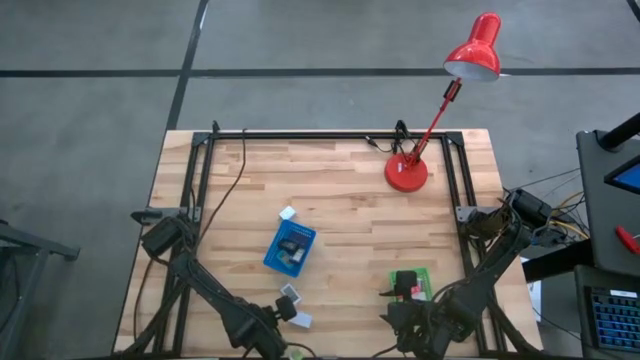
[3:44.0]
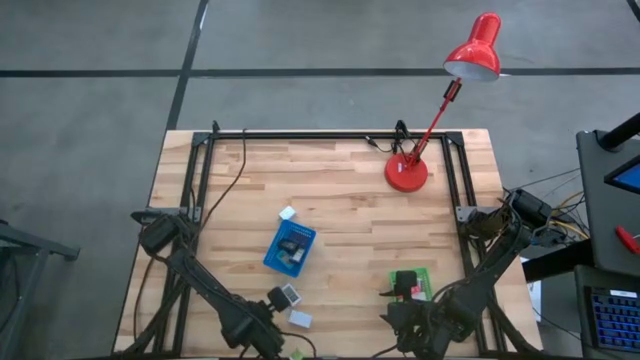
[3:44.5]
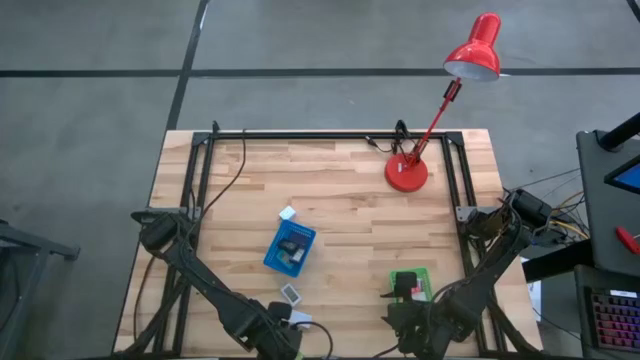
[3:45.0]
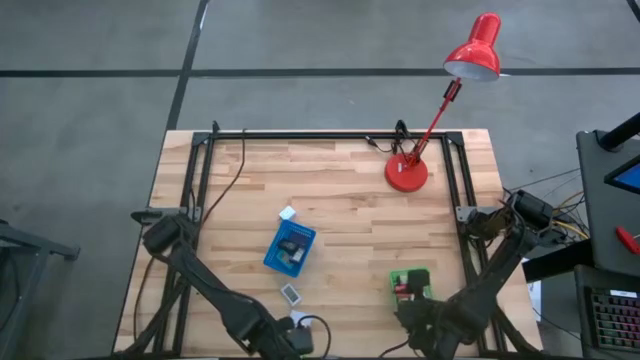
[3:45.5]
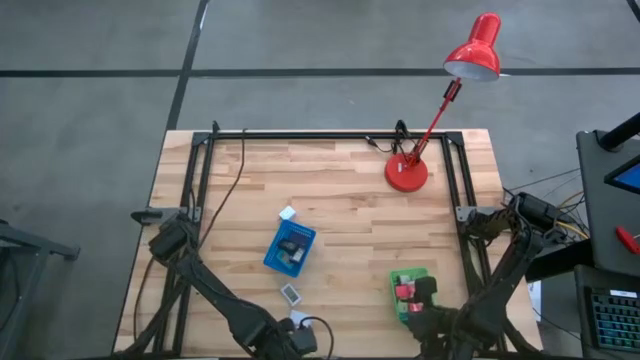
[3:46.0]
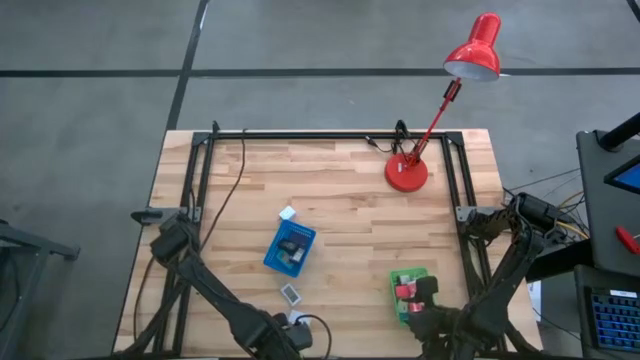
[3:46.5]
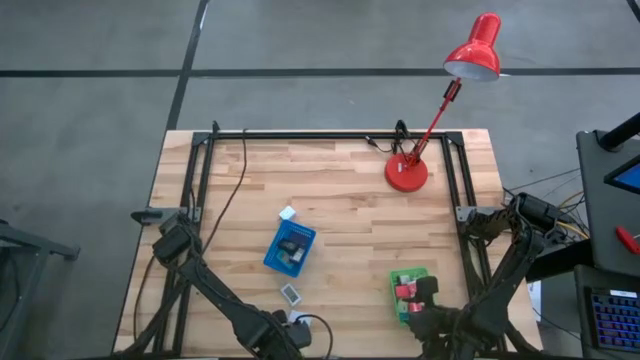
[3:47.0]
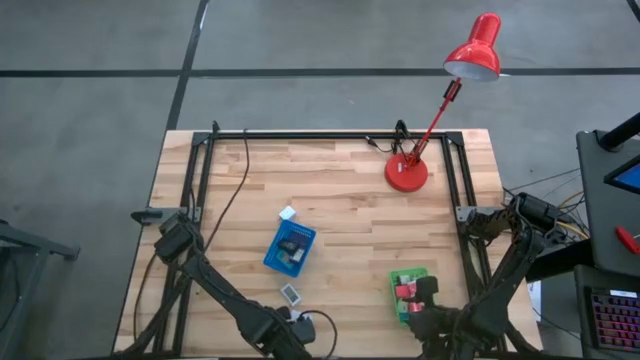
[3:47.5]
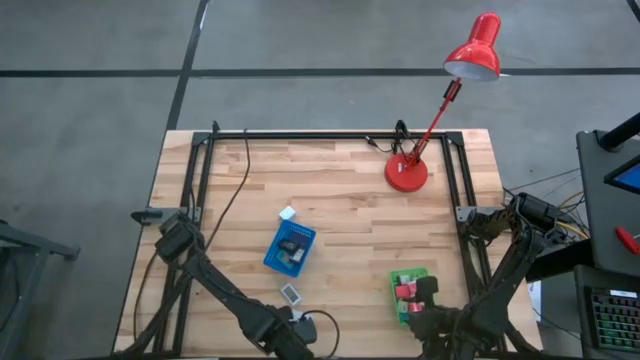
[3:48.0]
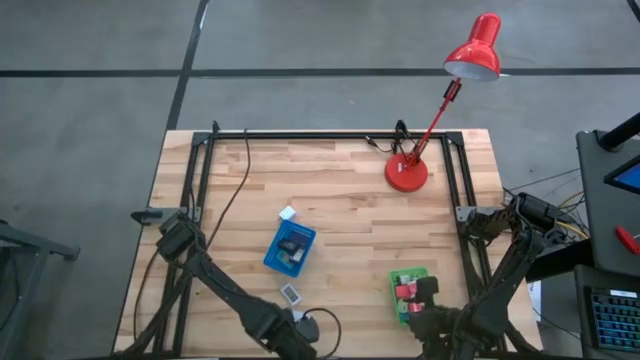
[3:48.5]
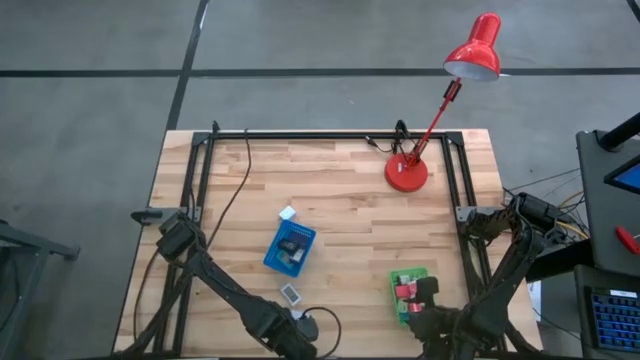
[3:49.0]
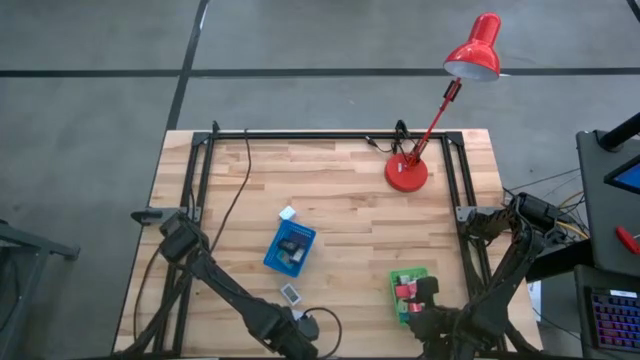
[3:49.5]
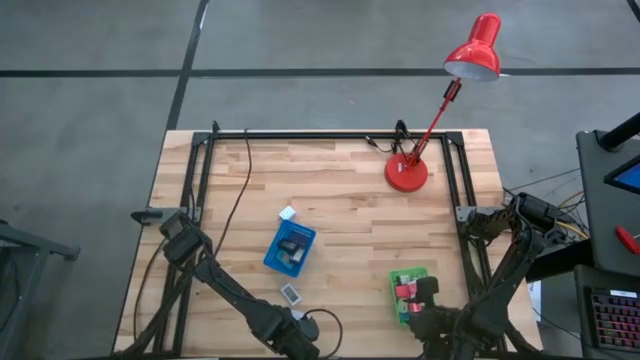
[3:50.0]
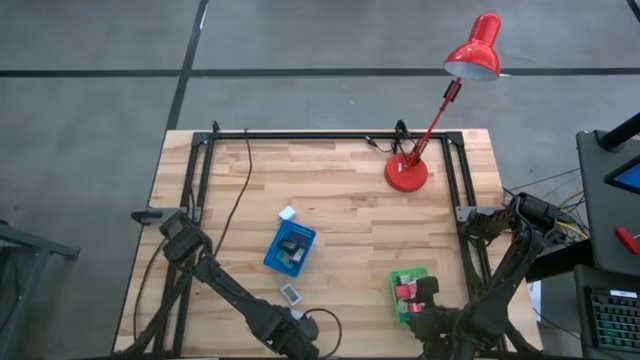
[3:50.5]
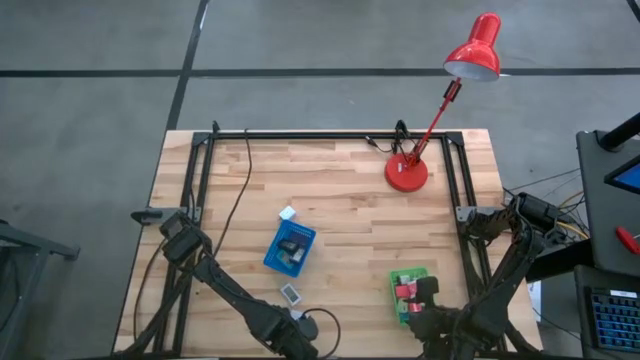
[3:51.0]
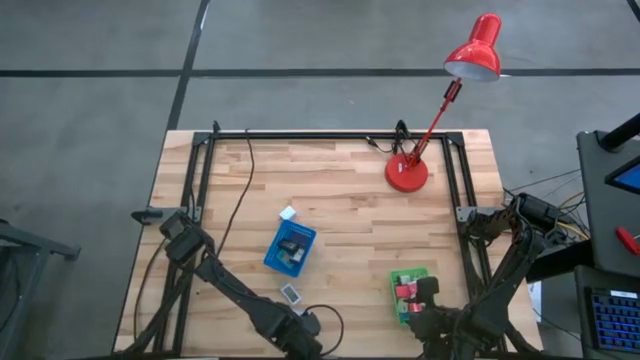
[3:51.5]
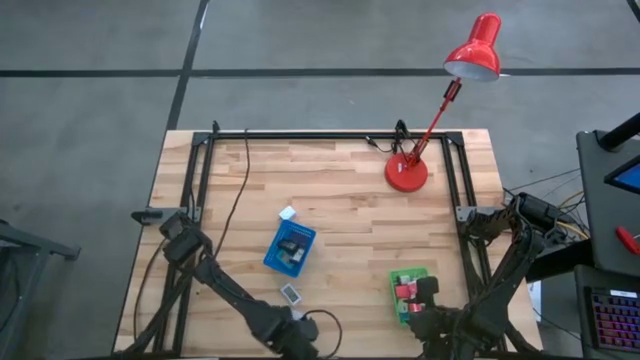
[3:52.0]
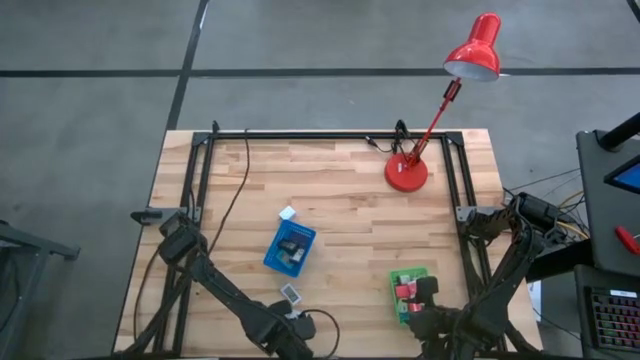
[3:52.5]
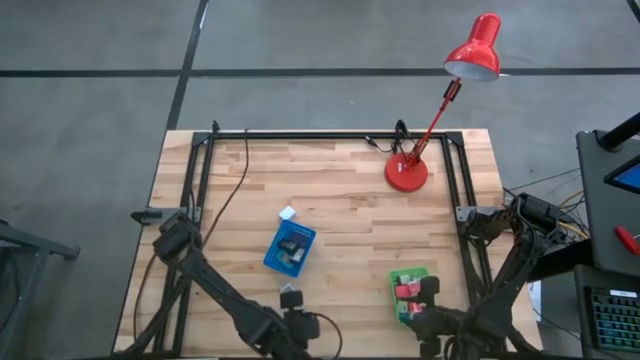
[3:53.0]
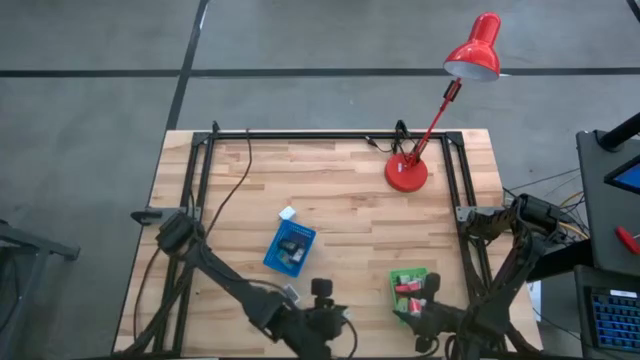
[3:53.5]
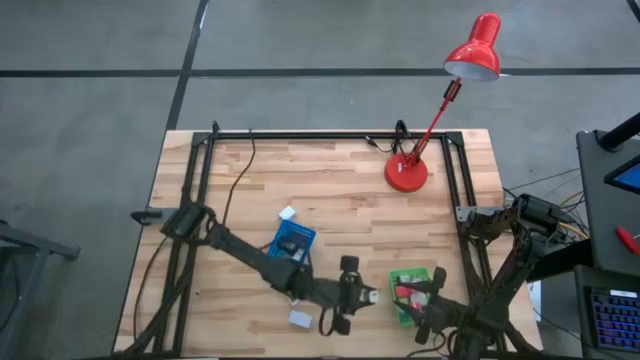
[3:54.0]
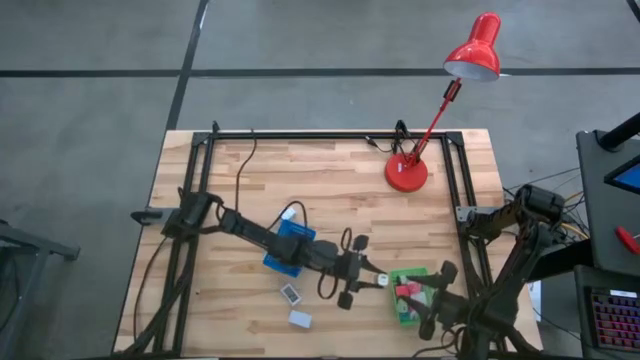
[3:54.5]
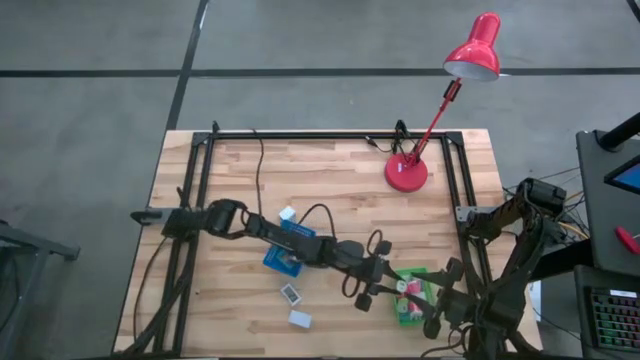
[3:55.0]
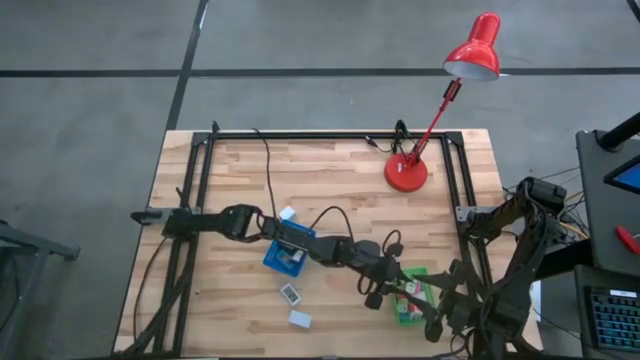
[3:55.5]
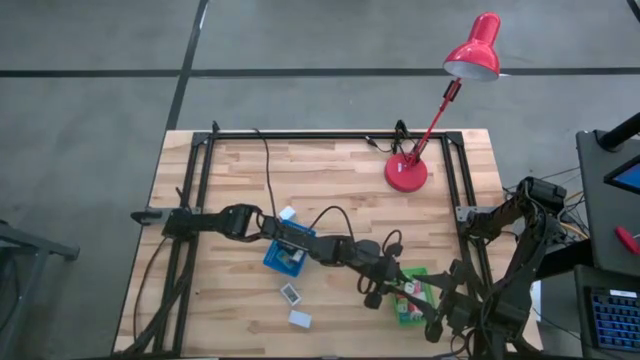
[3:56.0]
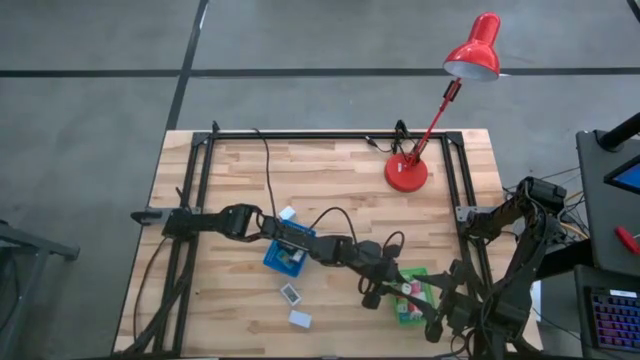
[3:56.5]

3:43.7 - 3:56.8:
Task: Pick & Place Office items
Put the green charger adapter into the green bin
